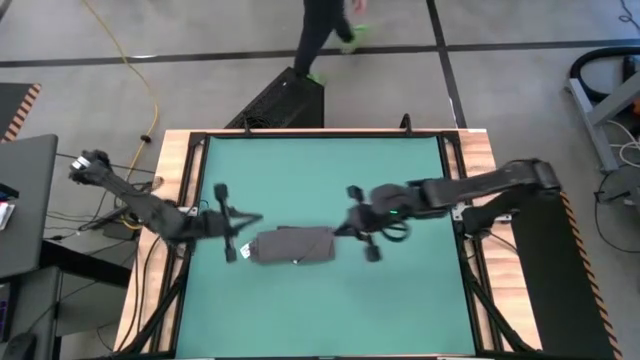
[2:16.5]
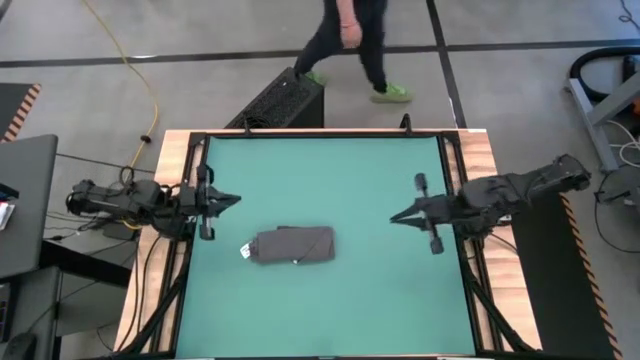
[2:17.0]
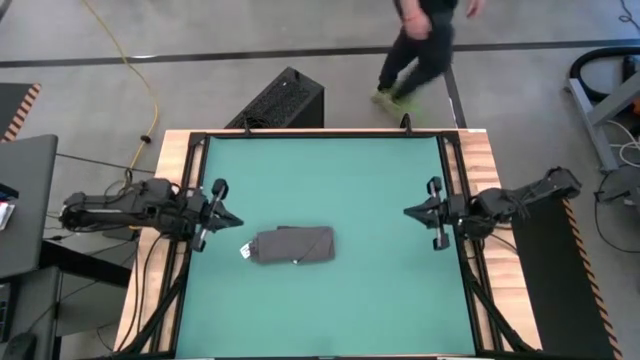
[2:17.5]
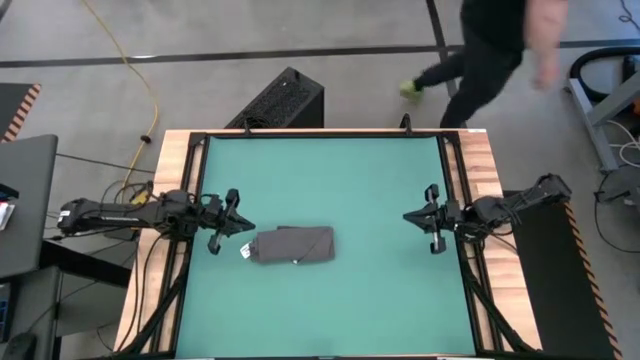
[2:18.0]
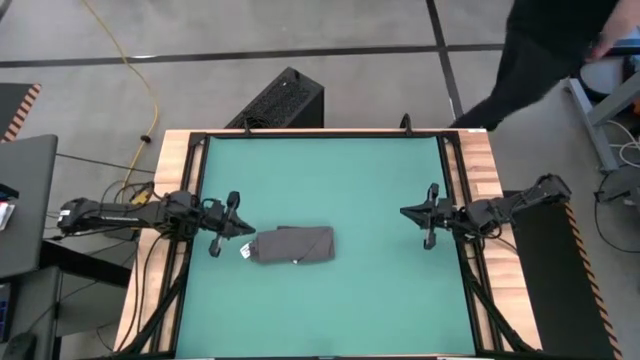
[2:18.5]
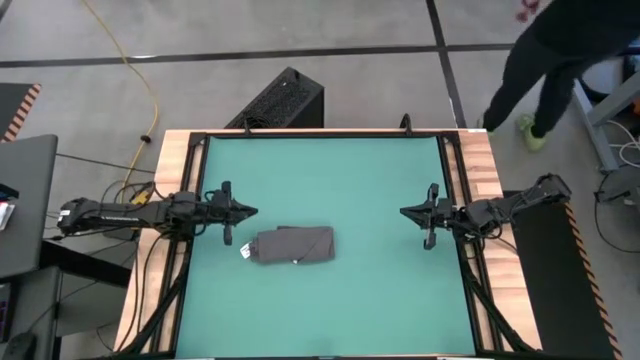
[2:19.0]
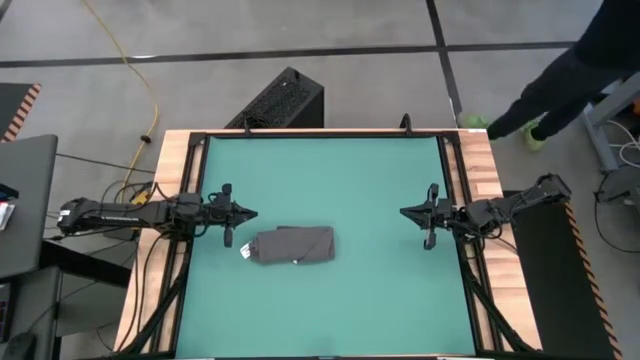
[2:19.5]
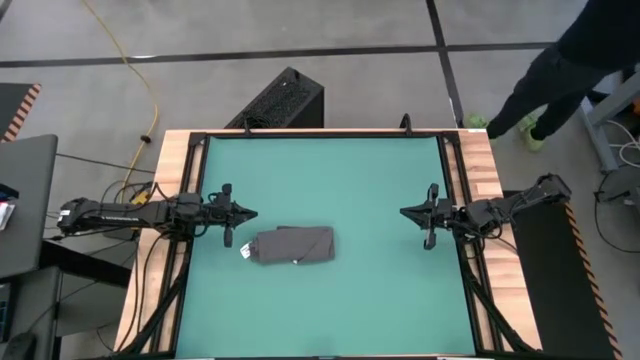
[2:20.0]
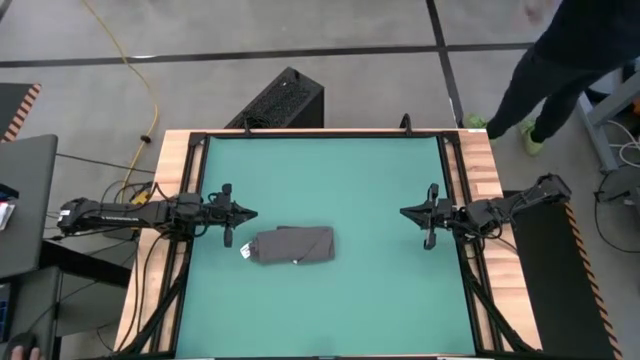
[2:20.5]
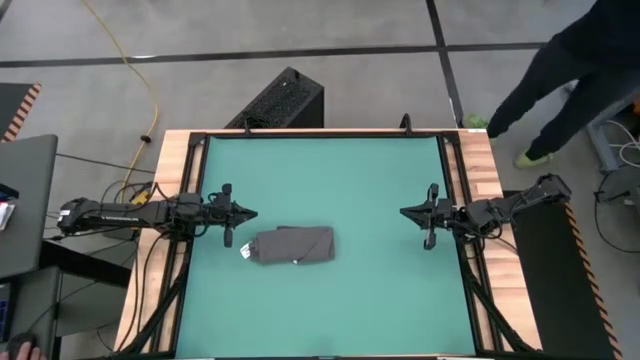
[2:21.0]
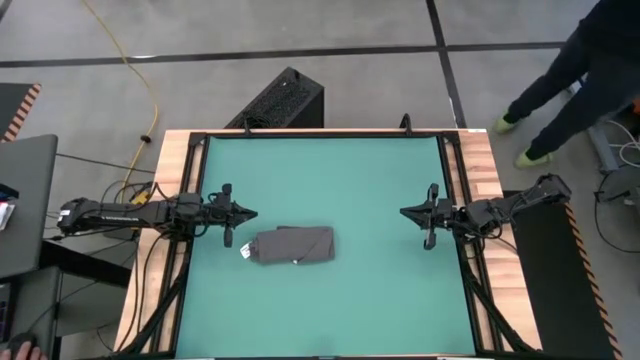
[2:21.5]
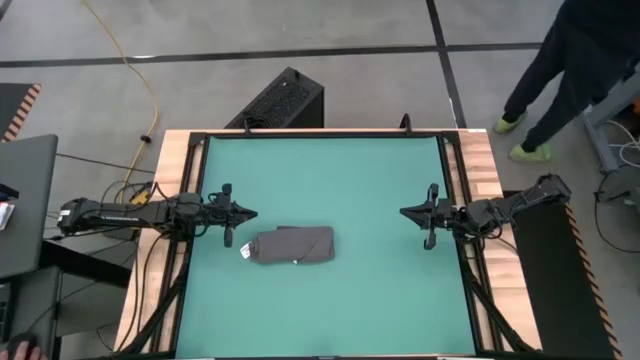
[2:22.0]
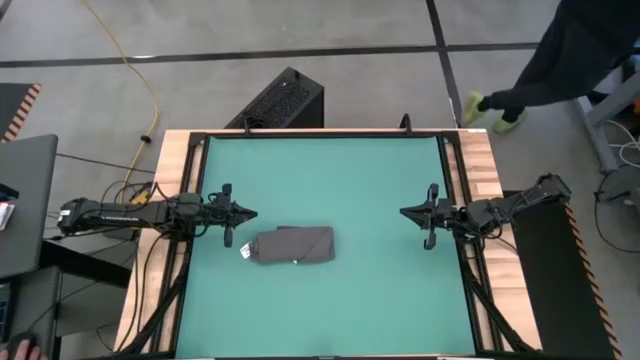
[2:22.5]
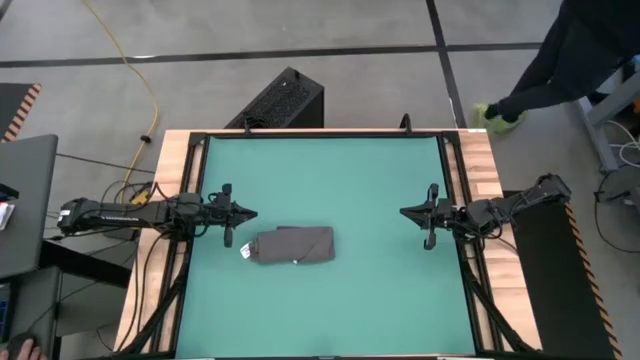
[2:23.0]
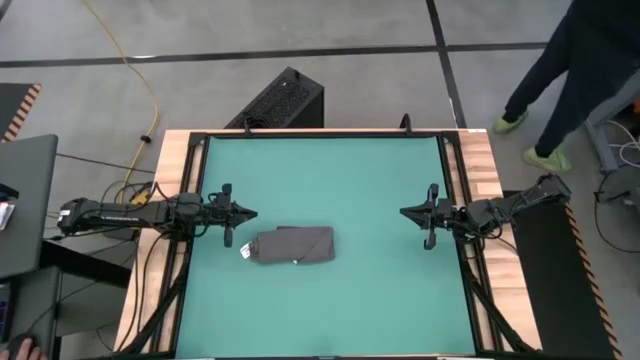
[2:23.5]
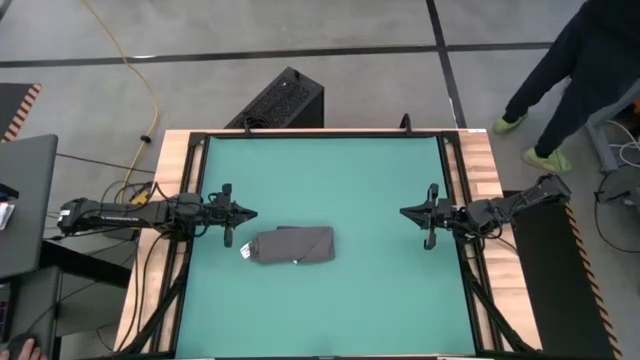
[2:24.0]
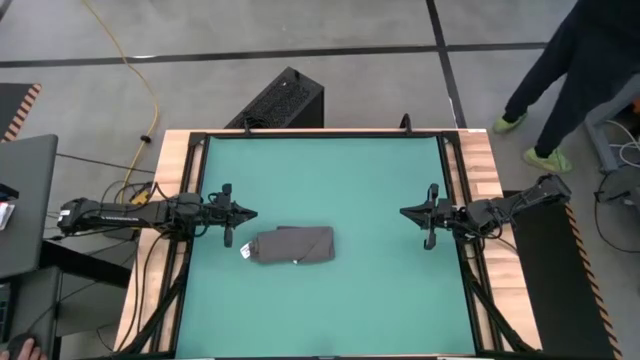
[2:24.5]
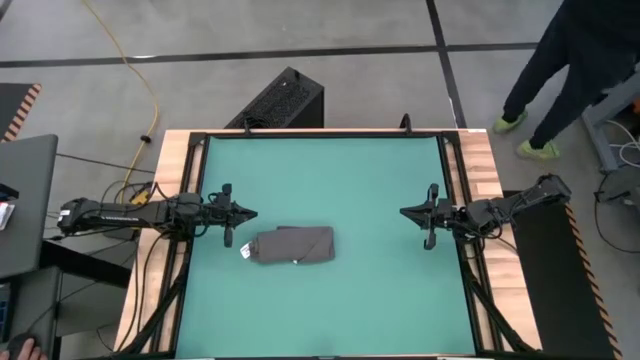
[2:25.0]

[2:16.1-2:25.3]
Task: Roll towel into tight, uniform cylinder
Return to Home Position

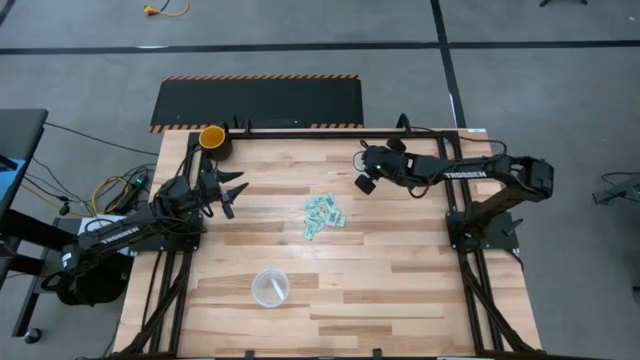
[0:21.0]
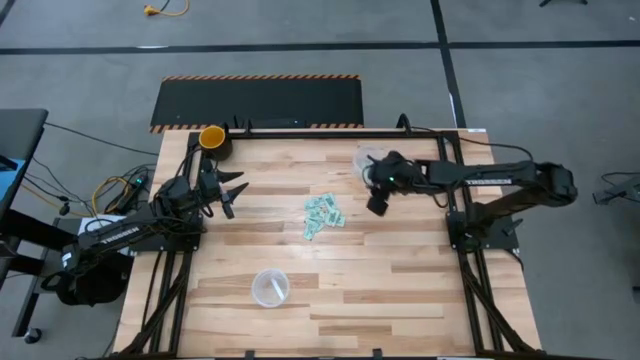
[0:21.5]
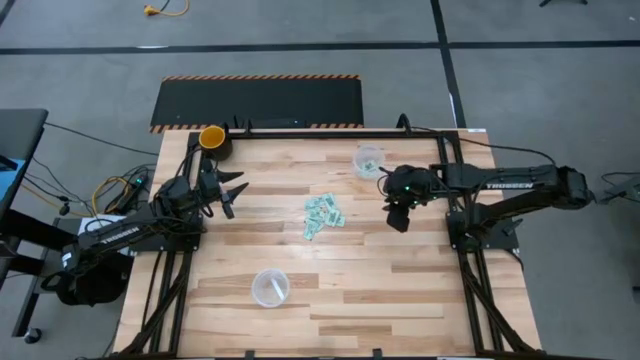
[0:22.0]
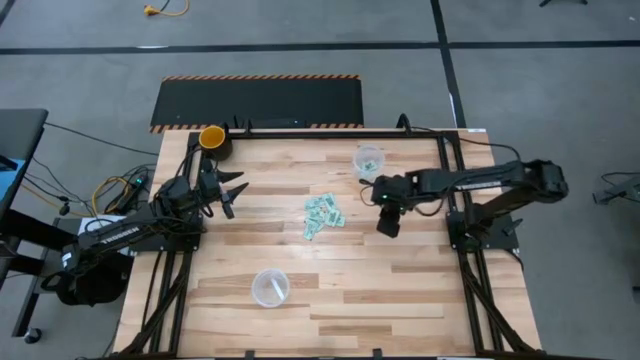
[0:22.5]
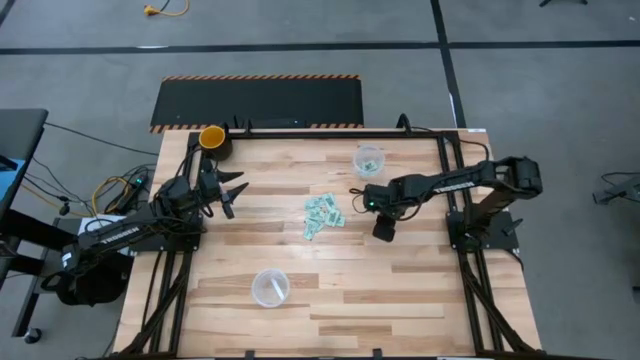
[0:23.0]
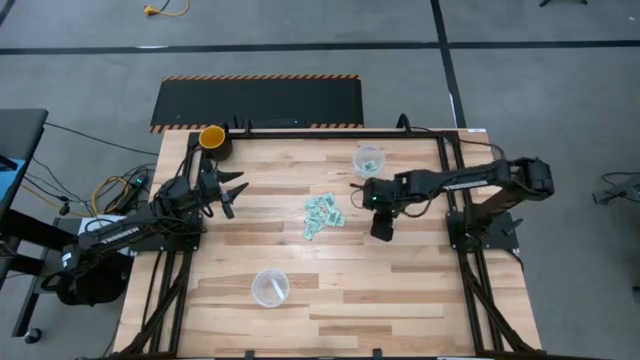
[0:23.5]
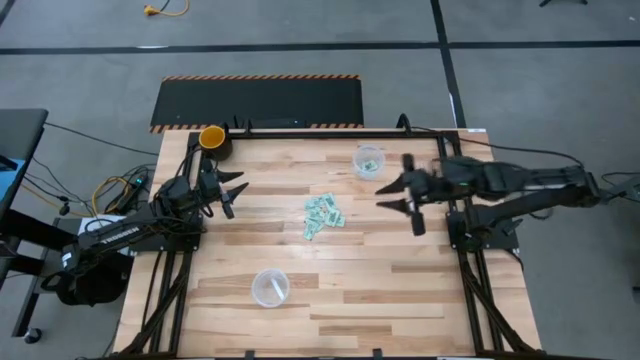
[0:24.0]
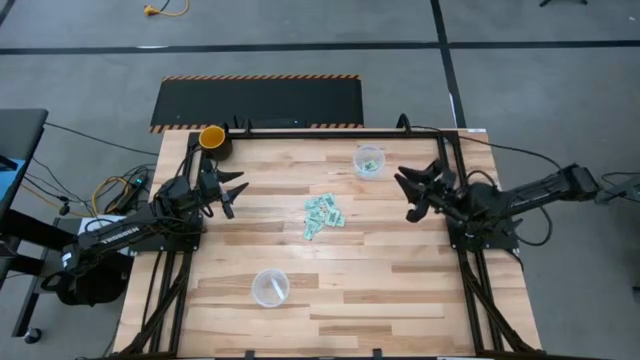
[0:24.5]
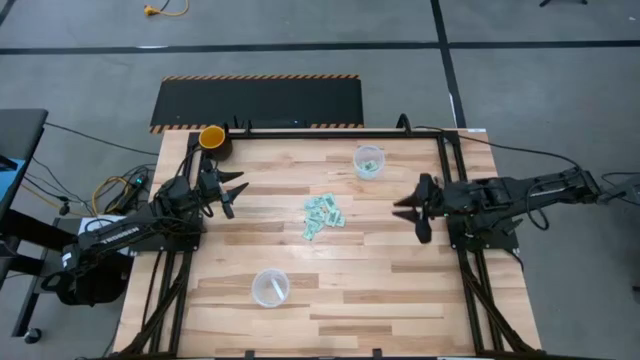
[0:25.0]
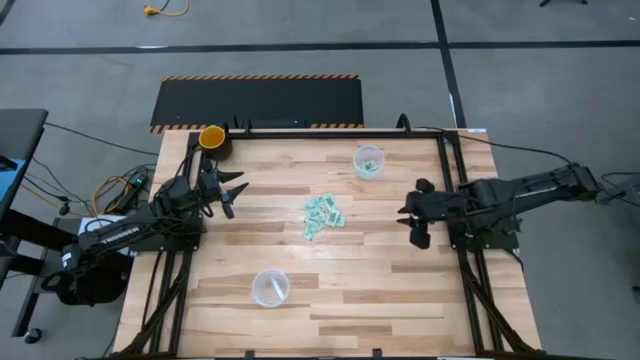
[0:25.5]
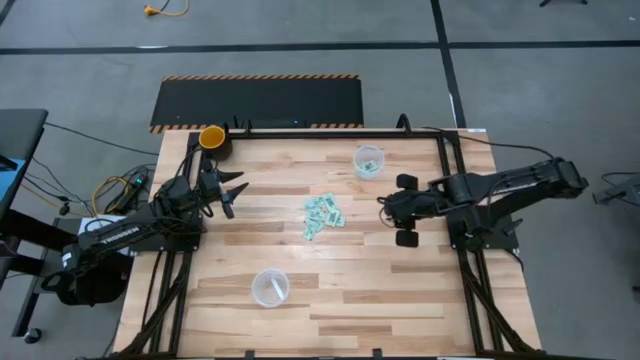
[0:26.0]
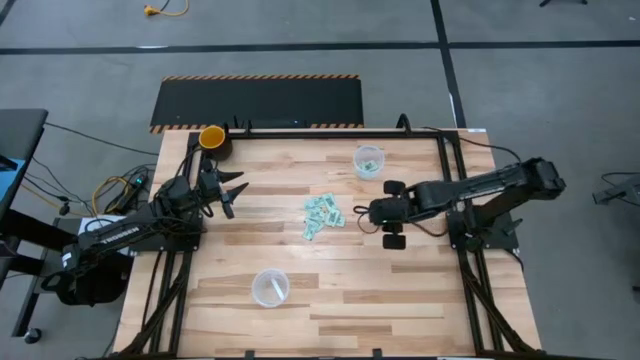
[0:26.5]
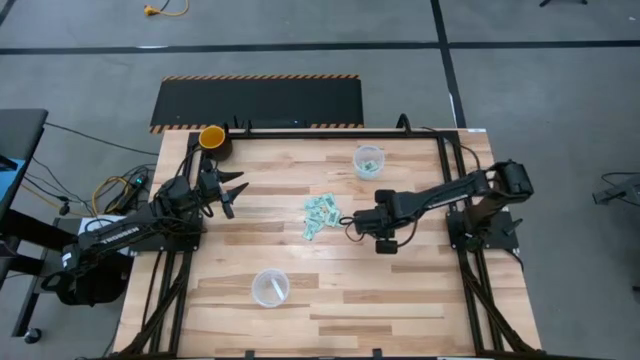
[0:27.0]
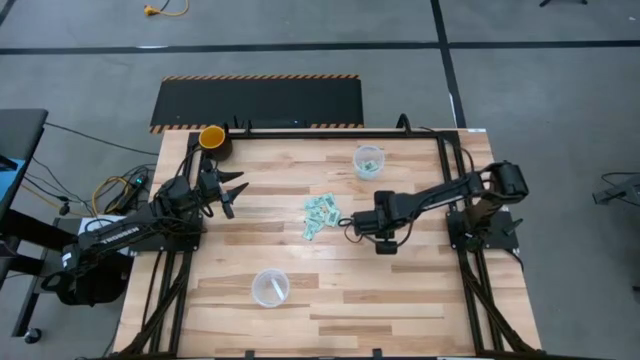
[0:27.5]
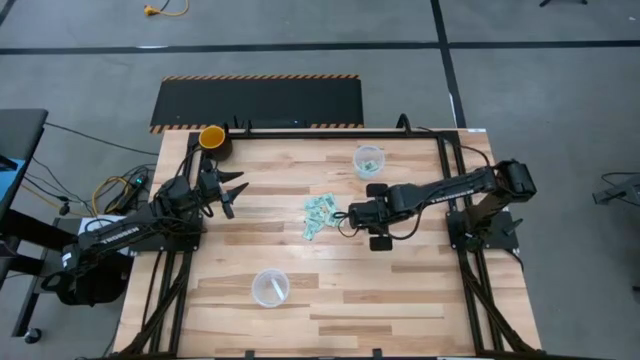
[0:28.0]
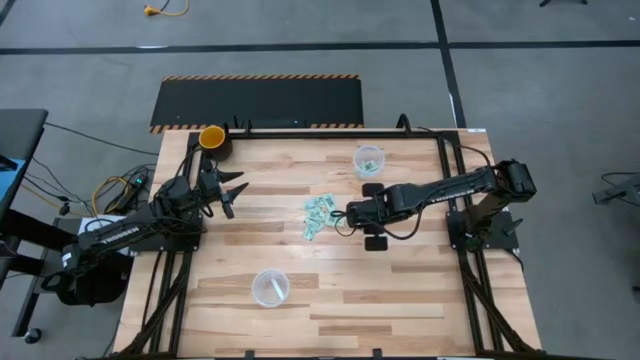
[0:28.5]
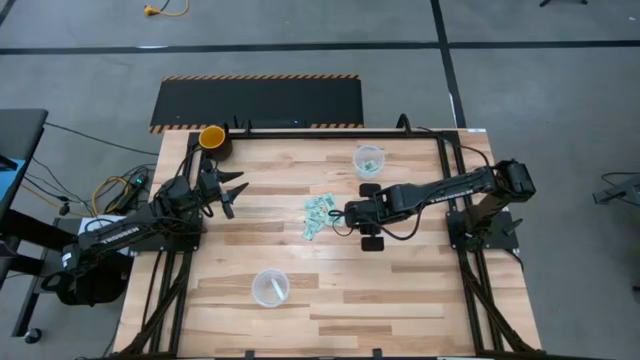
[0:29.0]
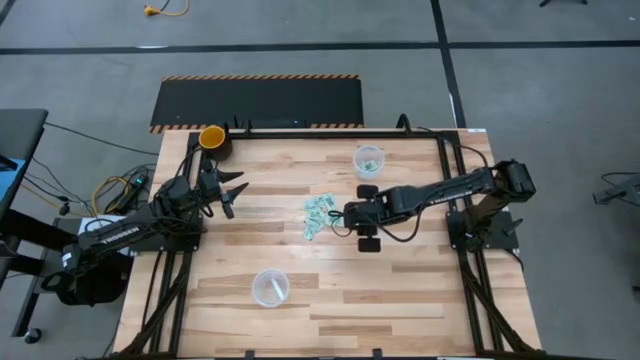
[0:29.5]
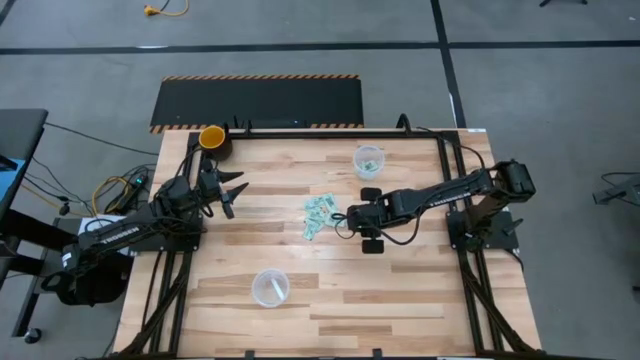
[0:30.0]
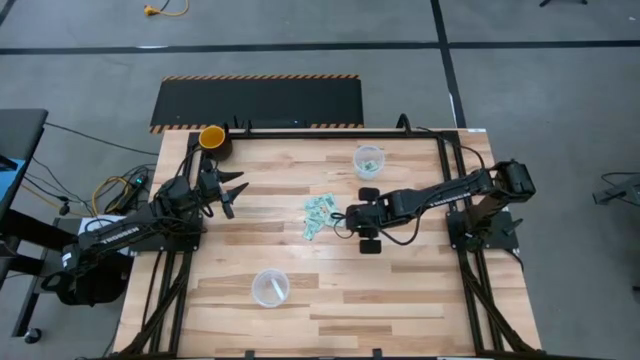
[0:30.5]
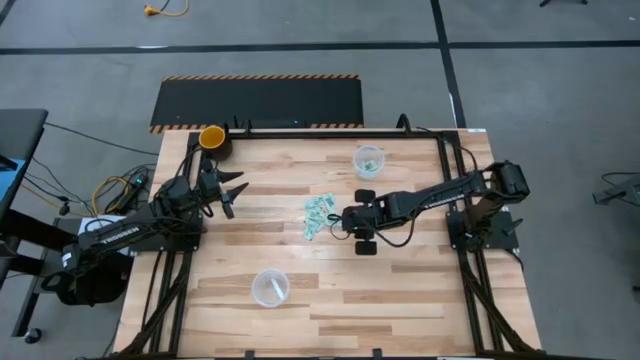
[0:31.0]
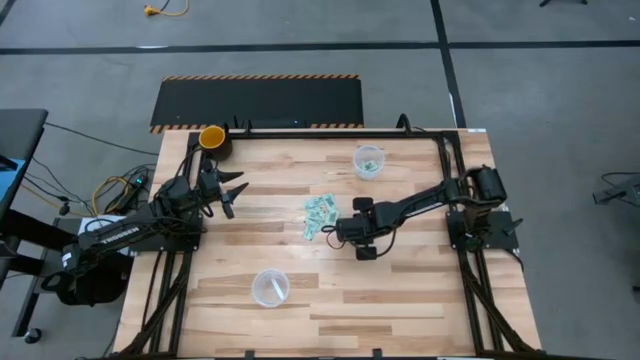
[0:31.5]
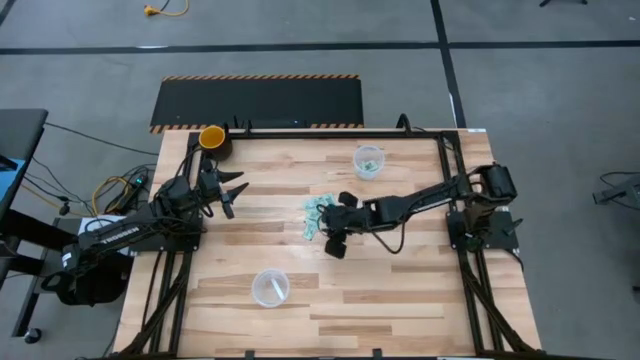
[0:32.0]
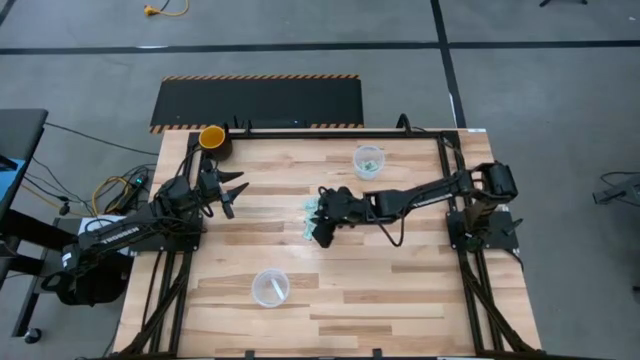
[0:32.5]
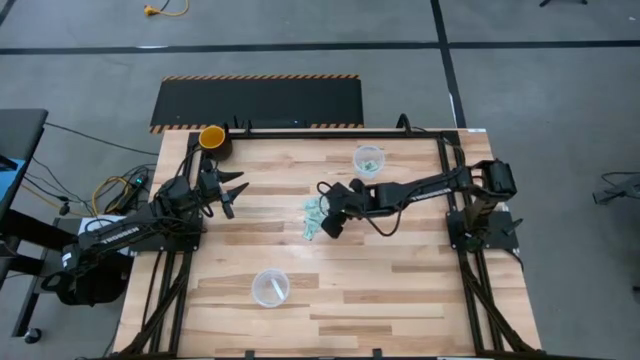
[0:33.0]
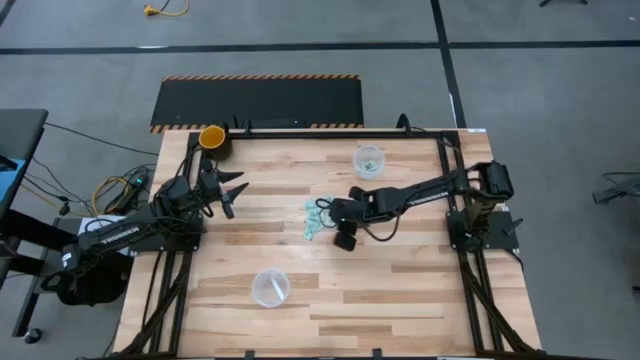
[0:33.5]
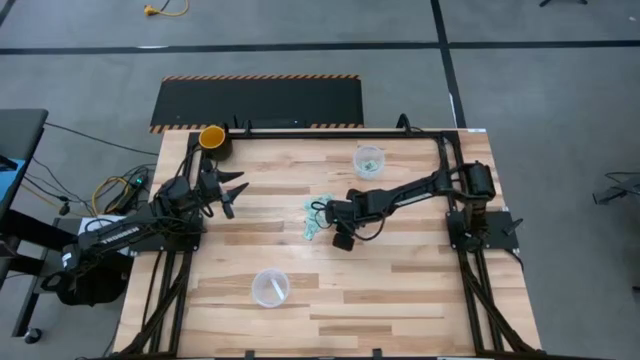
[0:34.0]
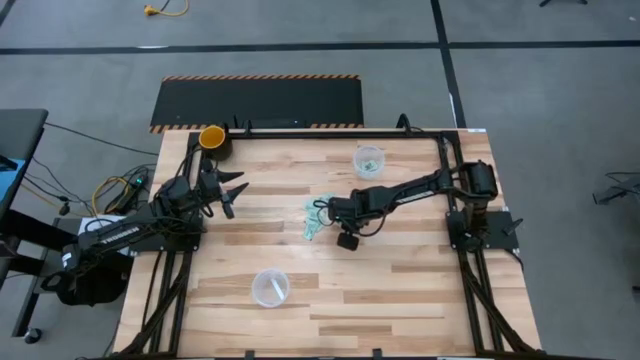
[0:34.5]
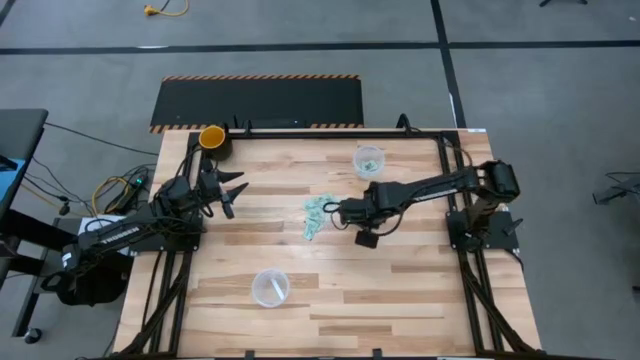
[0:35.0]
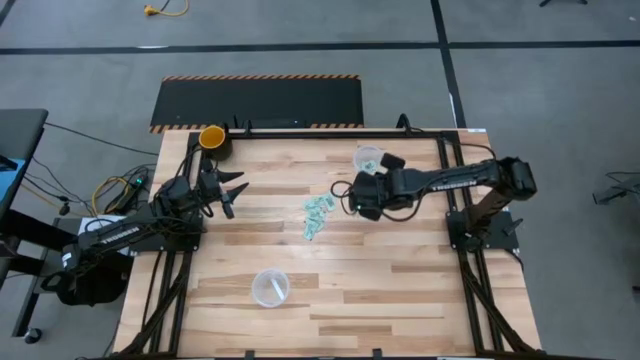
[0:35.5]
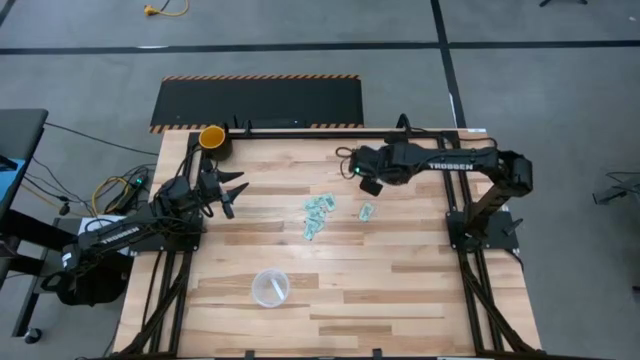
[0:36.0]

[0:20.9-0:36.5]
Task: Pick and place Stevia / Truvia into bins
Put the stevia packet into the top container
